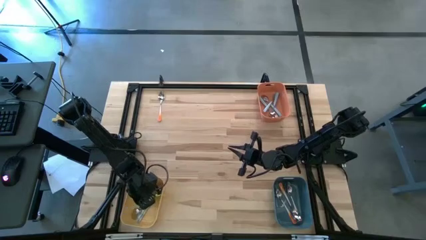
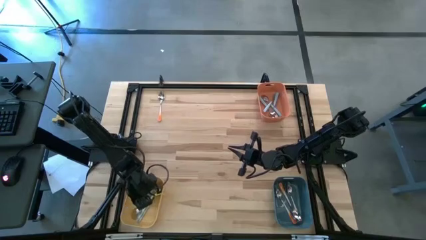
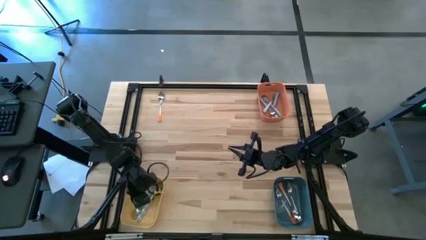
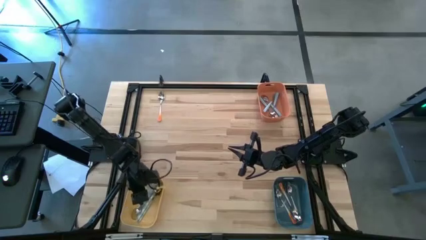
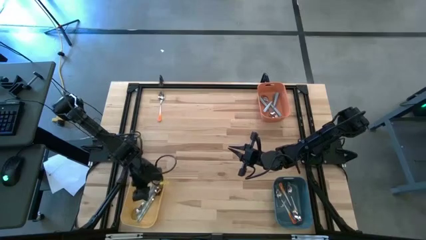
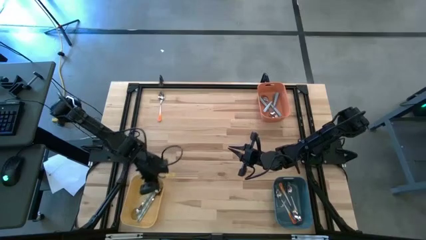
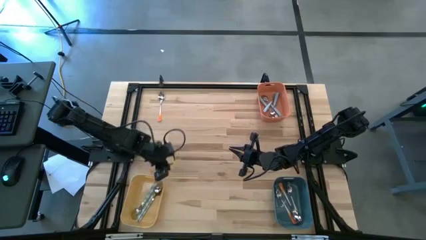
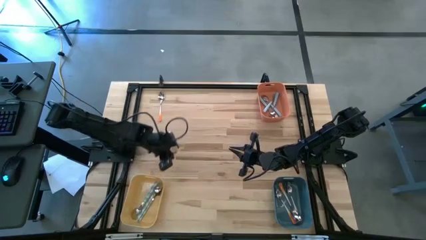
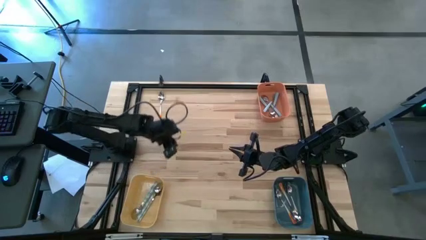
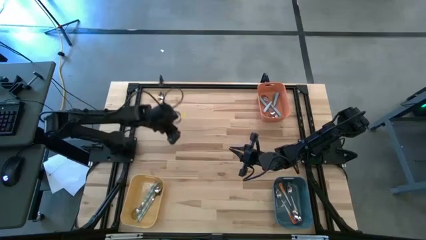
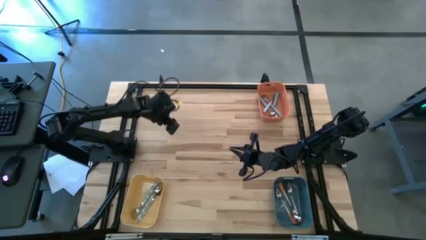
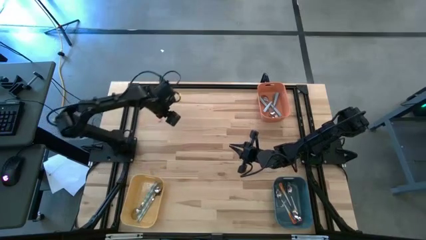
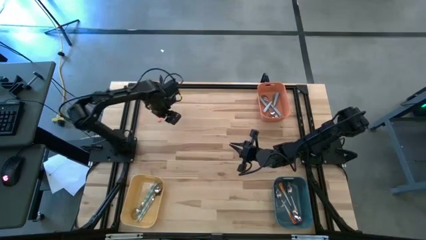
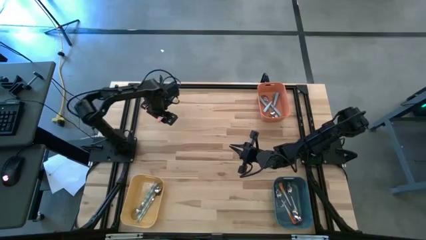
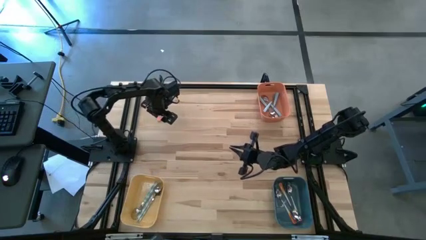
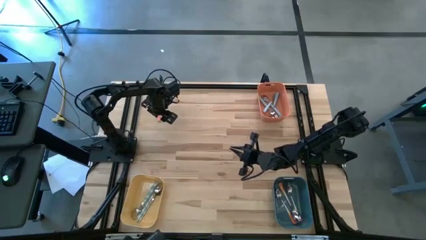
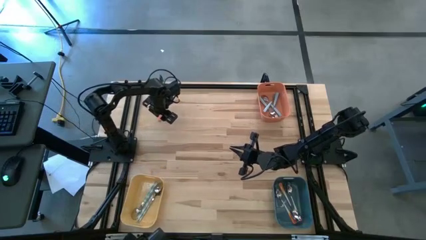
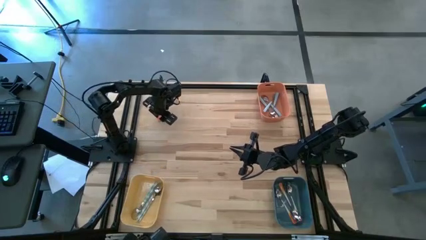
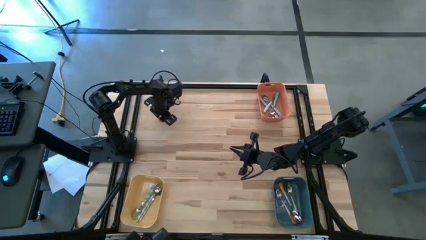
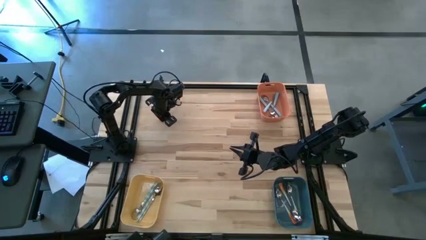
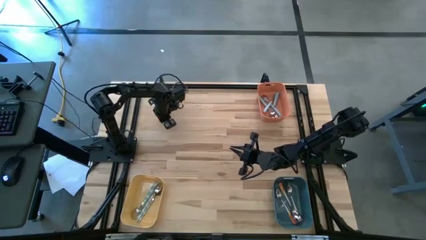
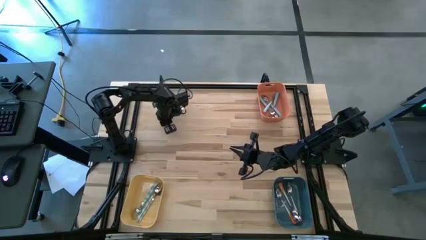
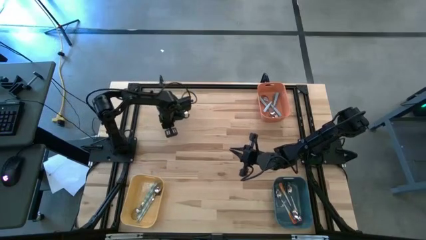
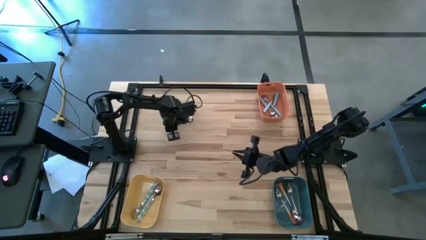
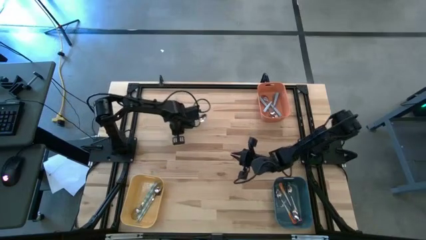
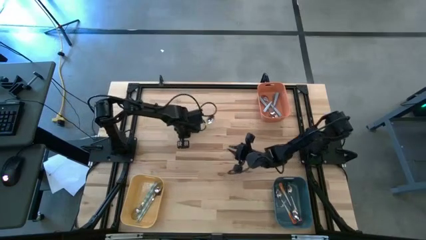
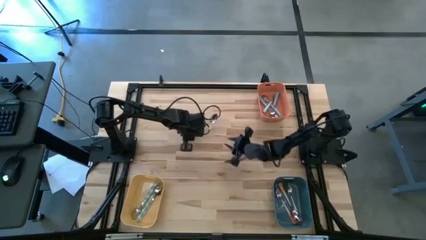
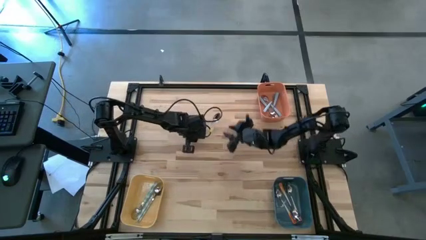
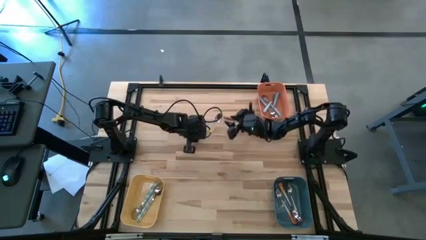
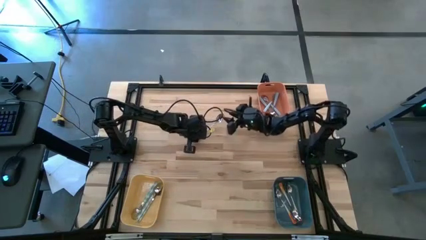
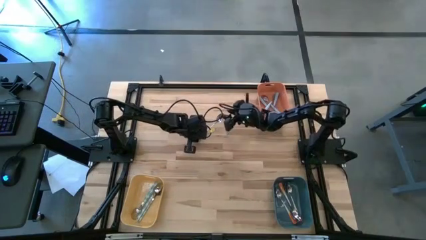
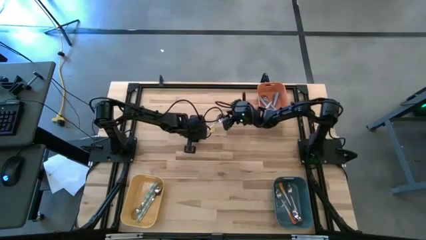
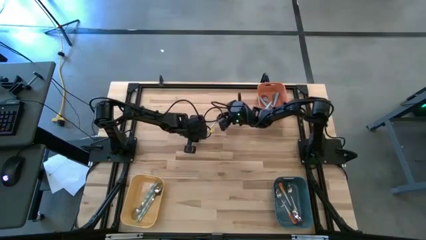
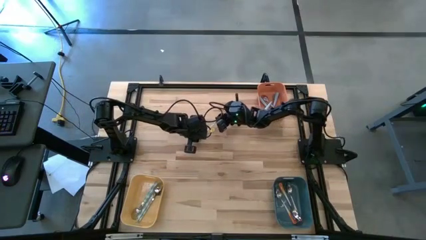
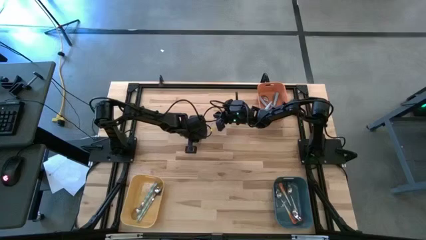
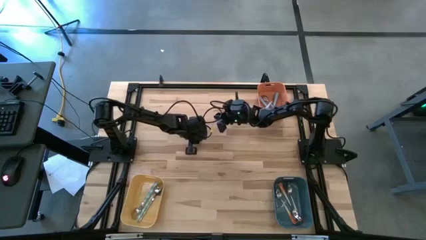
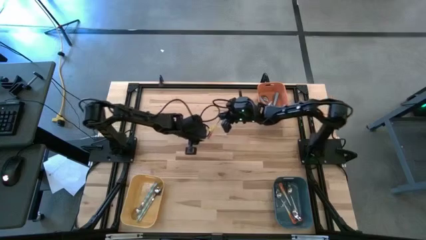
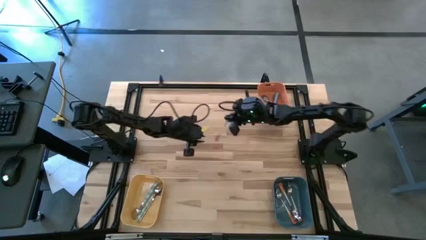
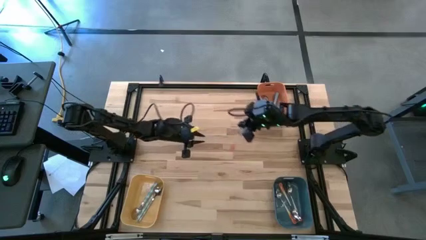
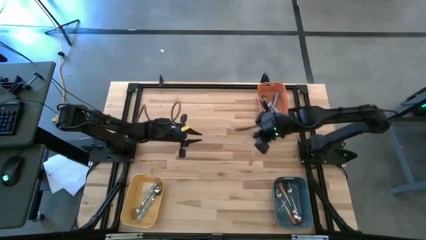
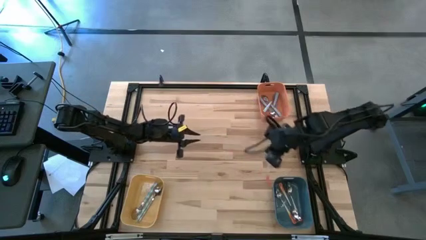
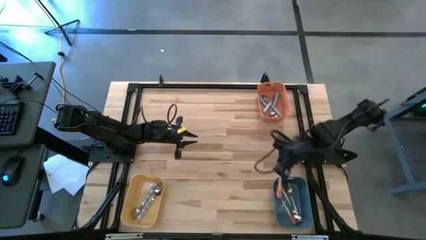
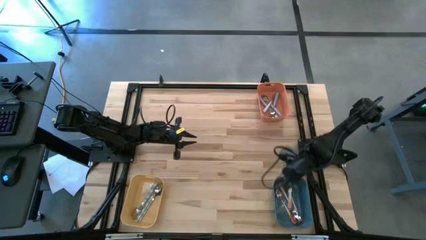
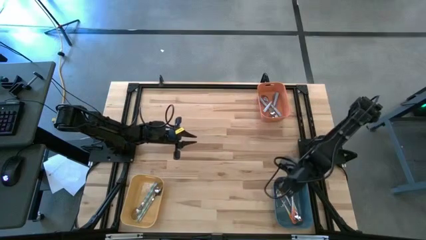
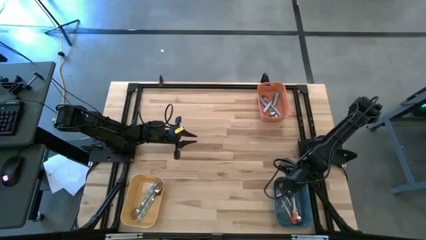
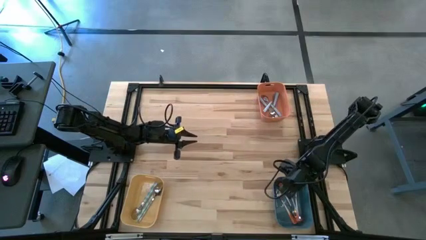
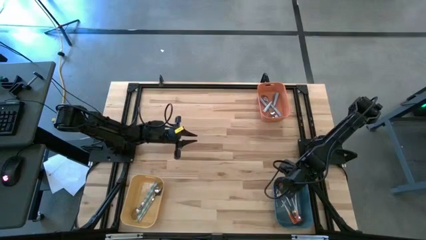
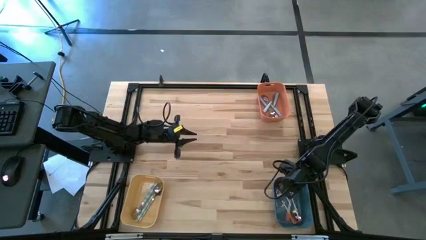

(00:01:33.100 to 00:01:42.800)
Task: Sort silverware by color (type)
Put the orange spoon into the dark blue bin

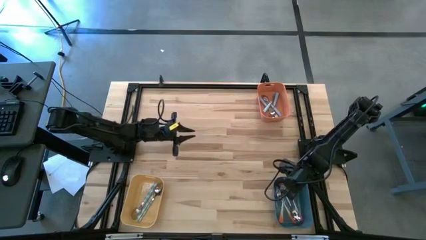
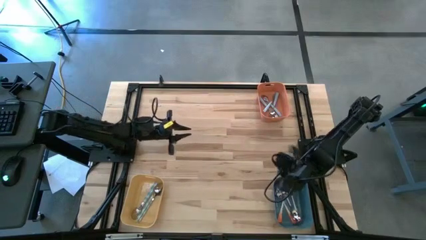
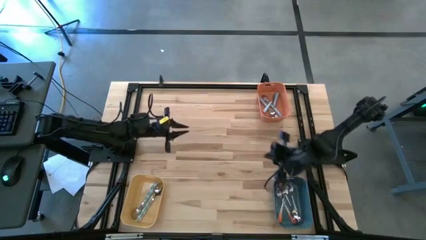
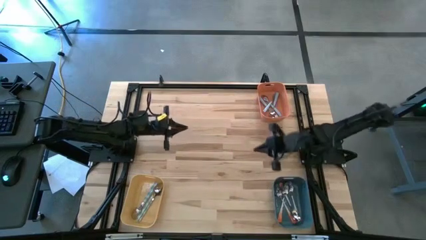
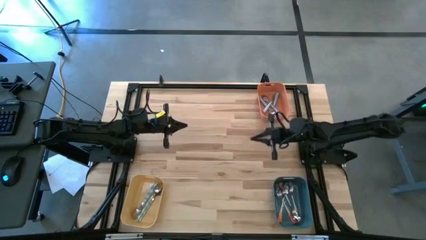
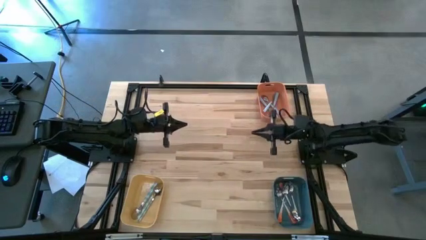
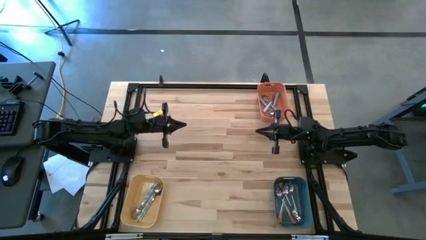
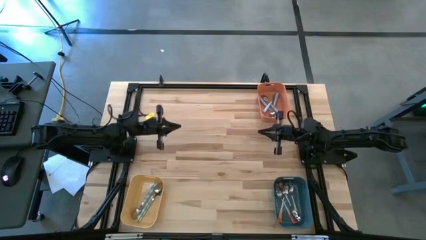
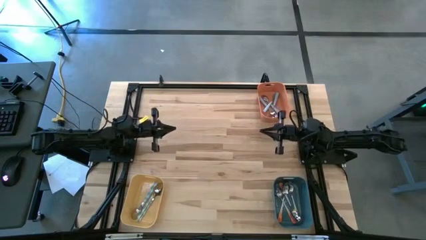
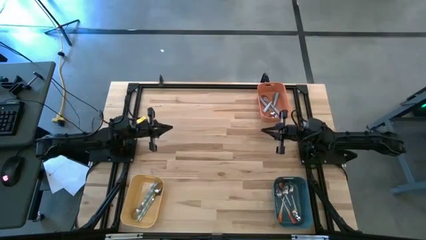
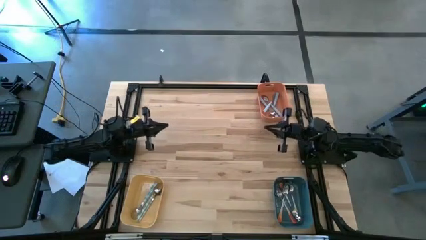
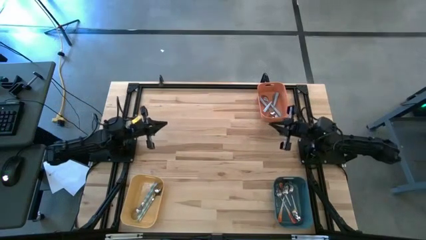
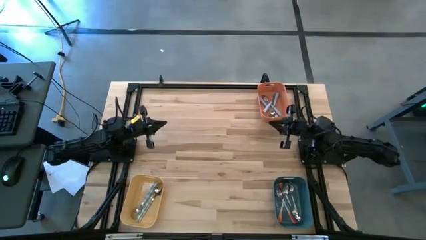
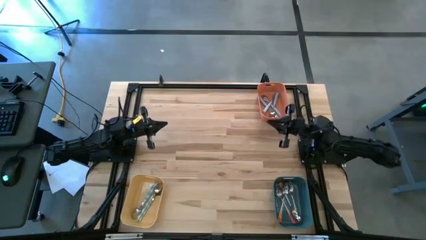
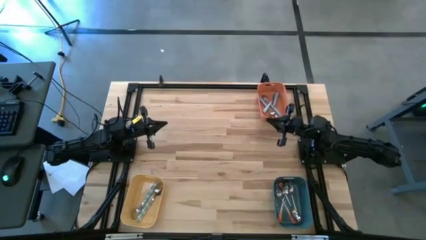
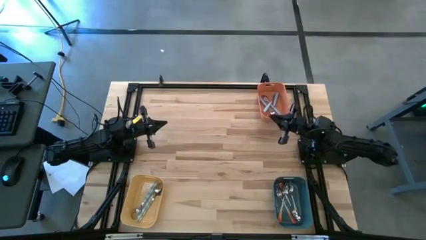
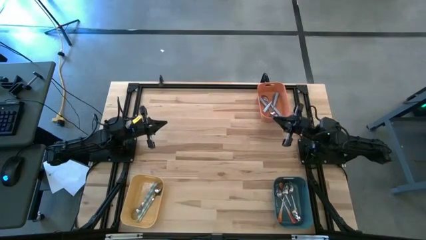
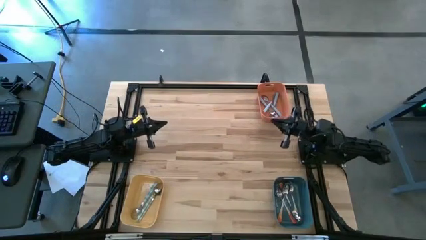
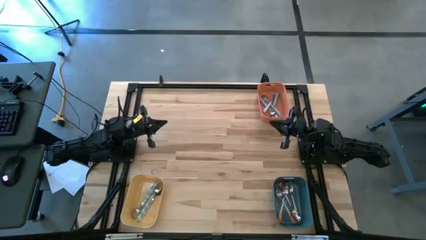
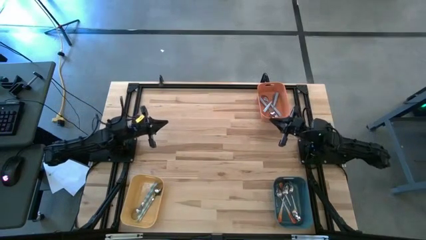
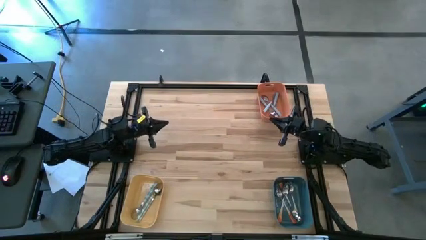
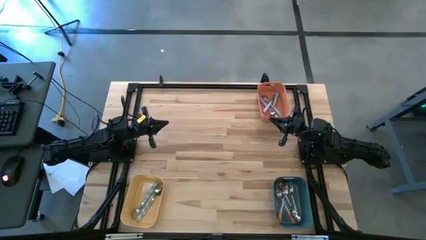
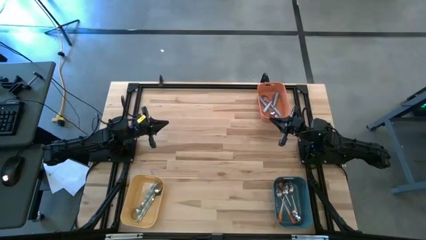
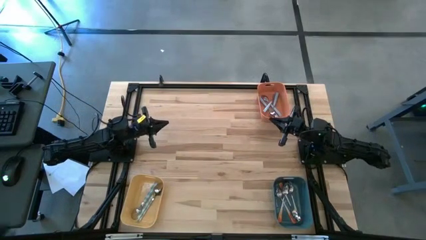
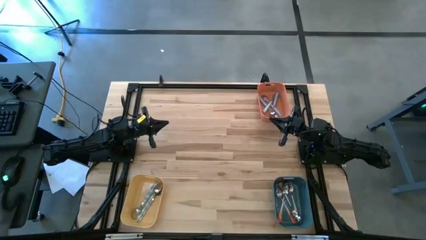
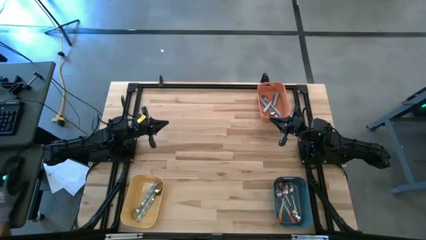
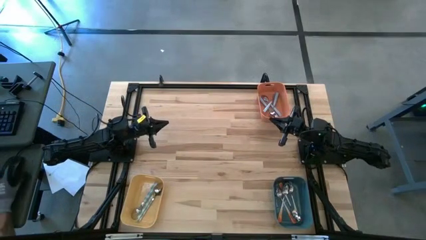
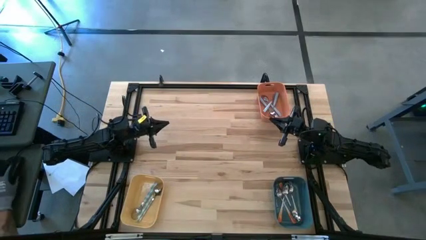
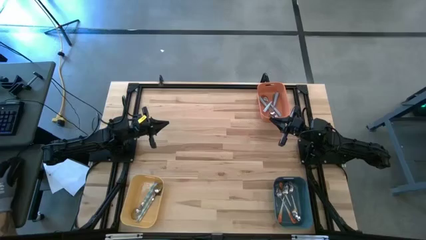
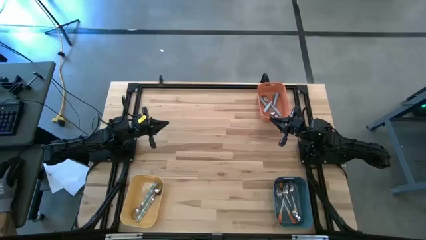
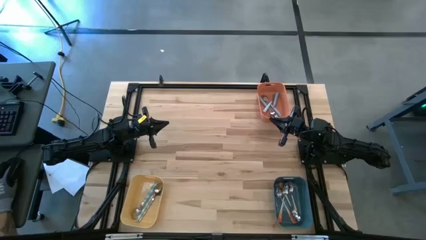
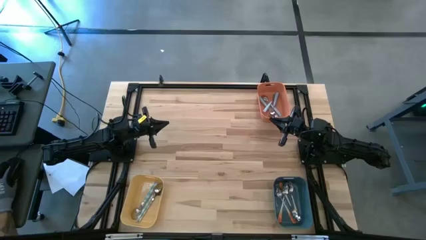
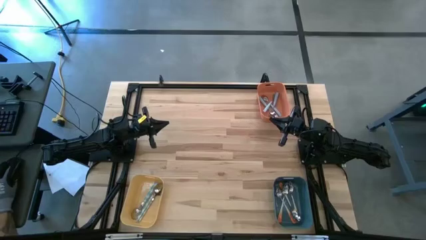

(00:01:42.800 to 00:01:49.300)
Return to Home Position
